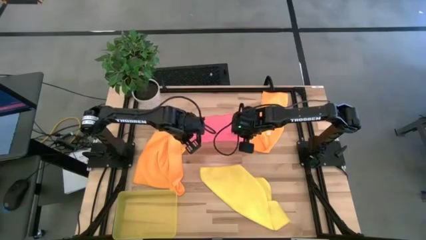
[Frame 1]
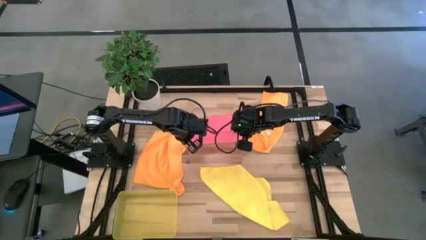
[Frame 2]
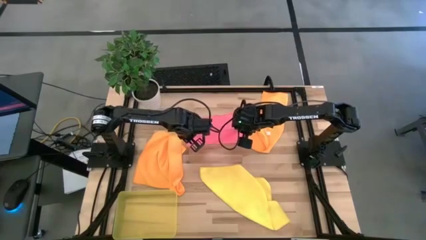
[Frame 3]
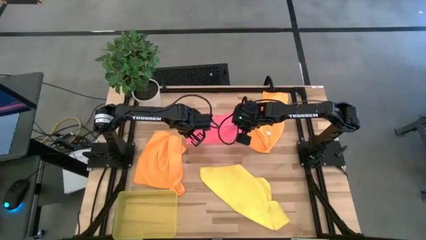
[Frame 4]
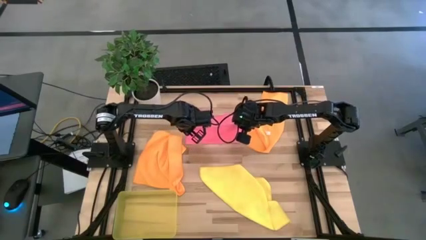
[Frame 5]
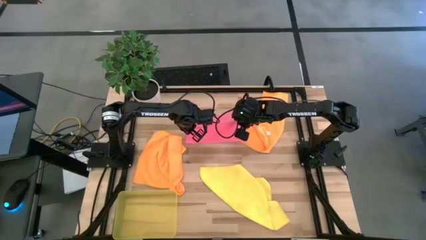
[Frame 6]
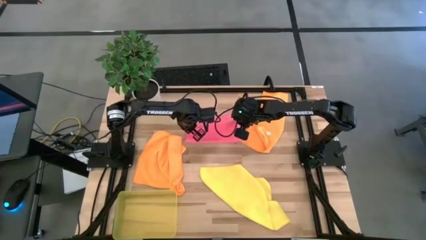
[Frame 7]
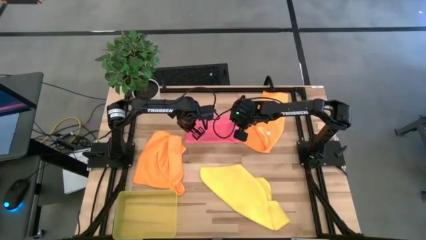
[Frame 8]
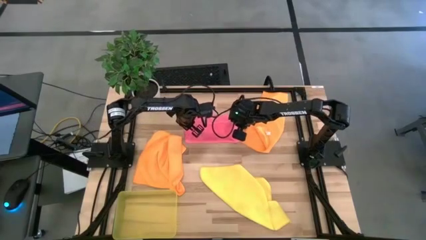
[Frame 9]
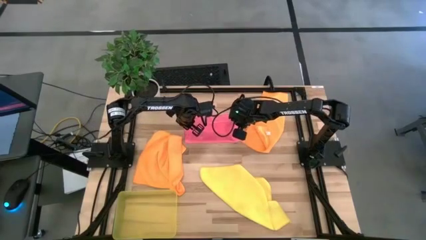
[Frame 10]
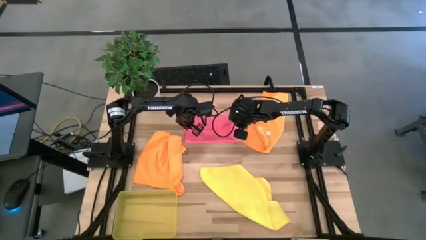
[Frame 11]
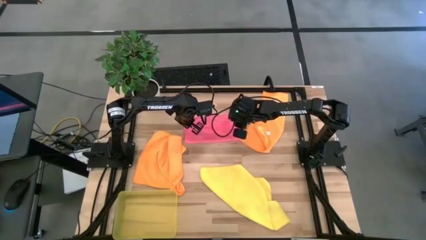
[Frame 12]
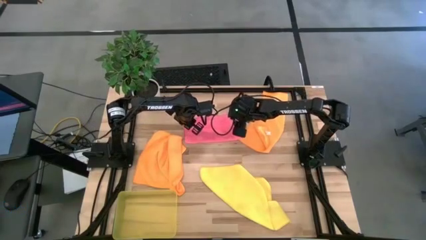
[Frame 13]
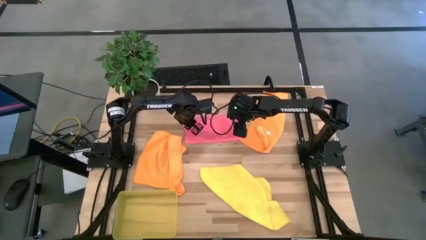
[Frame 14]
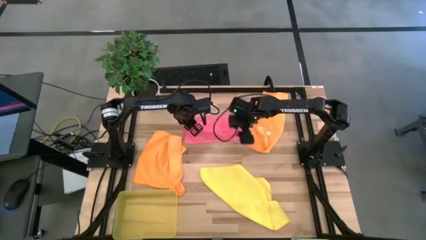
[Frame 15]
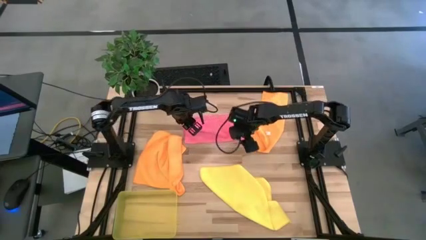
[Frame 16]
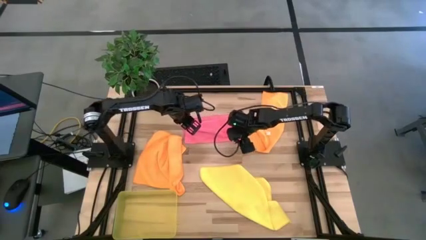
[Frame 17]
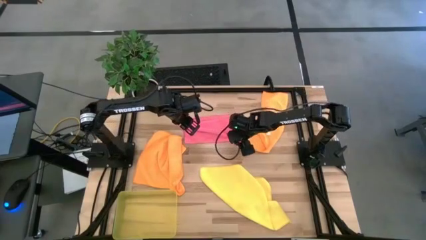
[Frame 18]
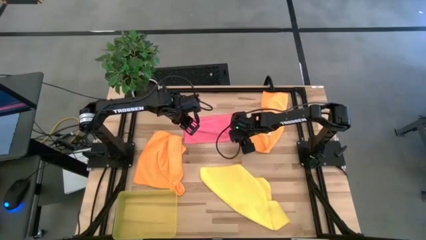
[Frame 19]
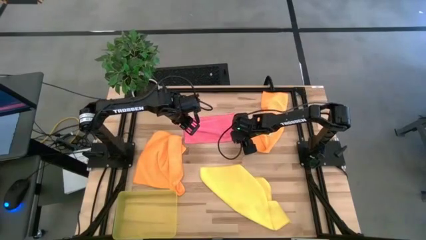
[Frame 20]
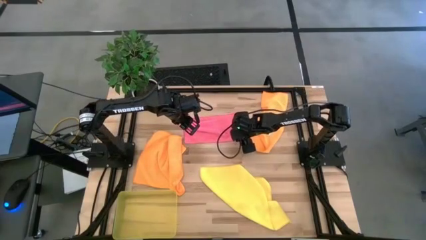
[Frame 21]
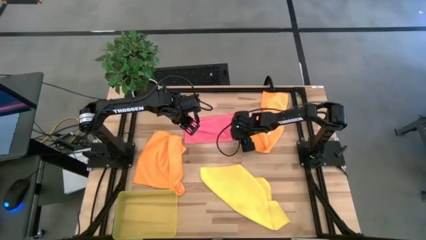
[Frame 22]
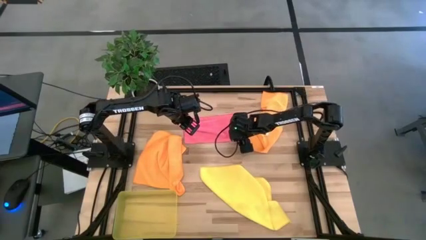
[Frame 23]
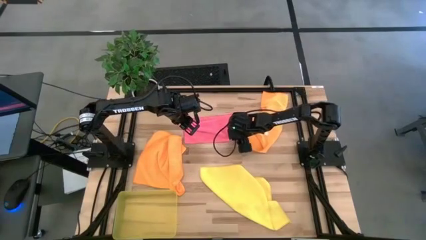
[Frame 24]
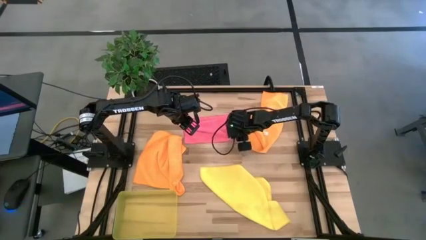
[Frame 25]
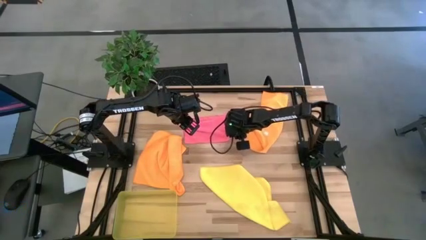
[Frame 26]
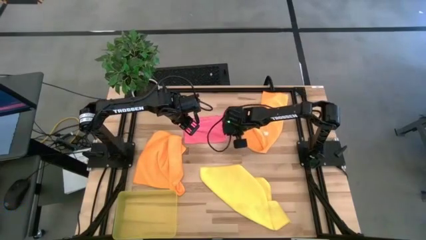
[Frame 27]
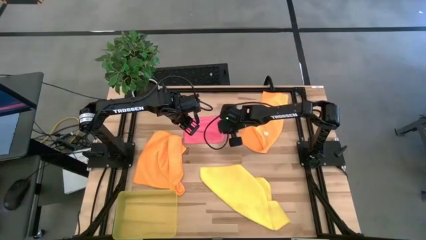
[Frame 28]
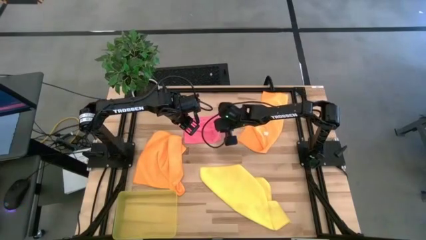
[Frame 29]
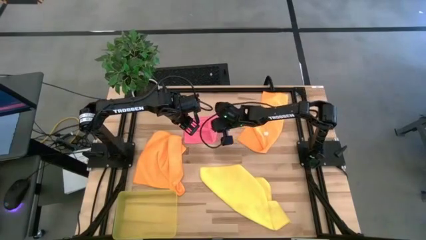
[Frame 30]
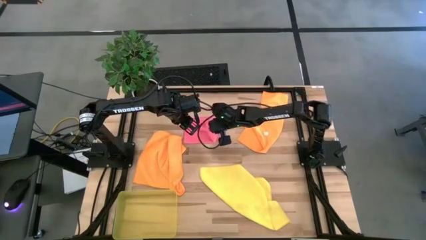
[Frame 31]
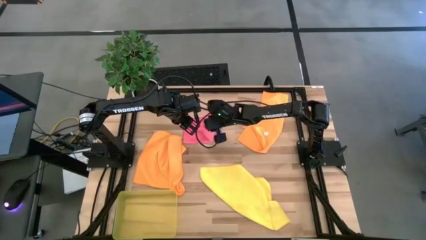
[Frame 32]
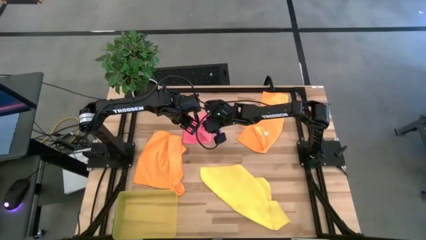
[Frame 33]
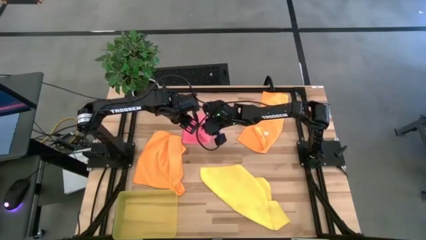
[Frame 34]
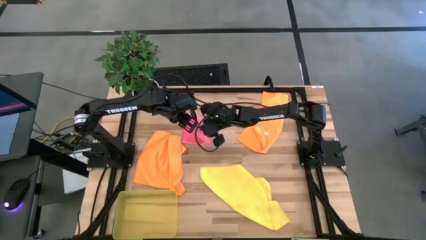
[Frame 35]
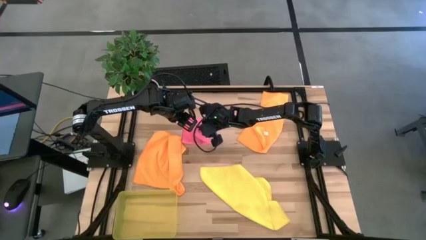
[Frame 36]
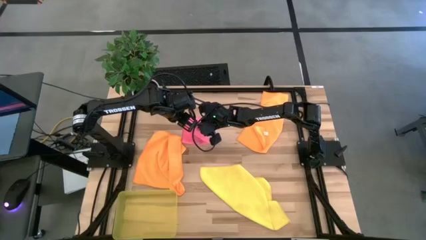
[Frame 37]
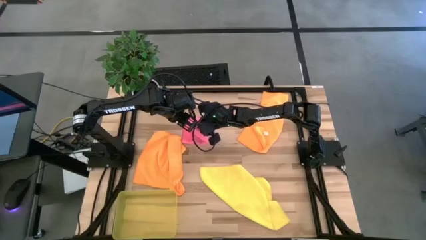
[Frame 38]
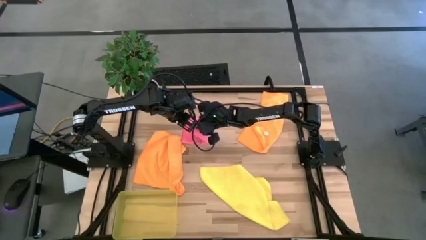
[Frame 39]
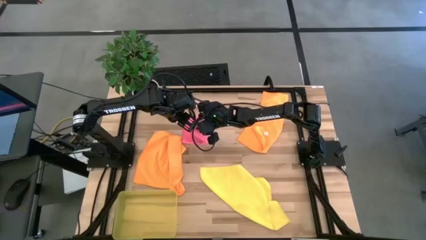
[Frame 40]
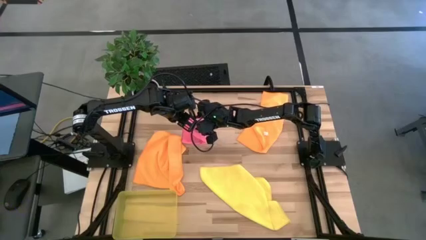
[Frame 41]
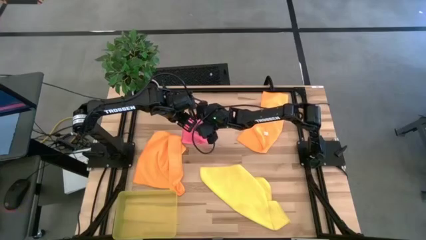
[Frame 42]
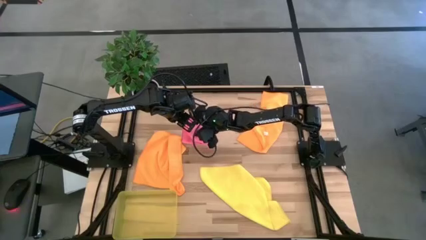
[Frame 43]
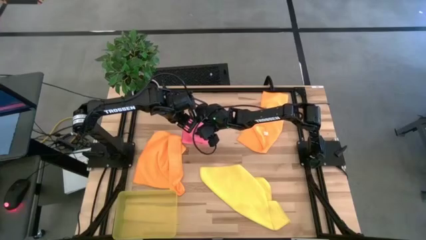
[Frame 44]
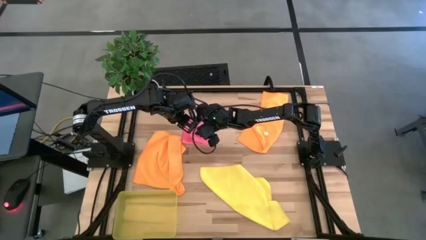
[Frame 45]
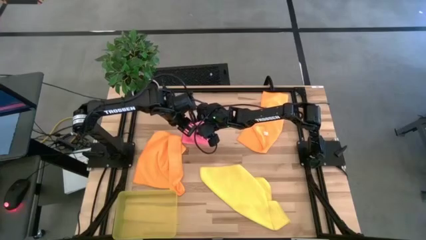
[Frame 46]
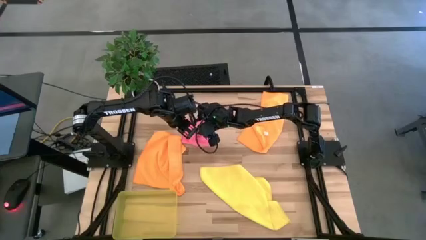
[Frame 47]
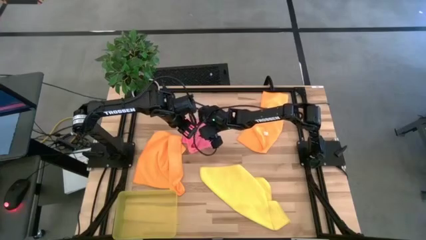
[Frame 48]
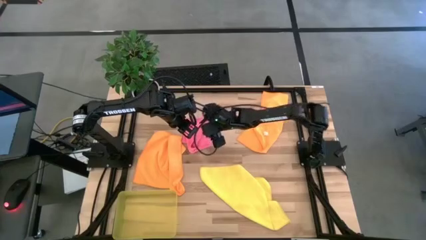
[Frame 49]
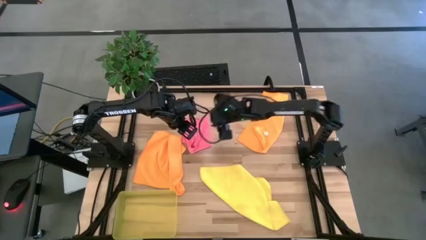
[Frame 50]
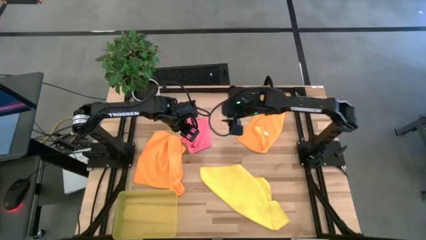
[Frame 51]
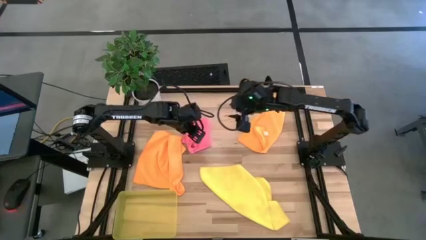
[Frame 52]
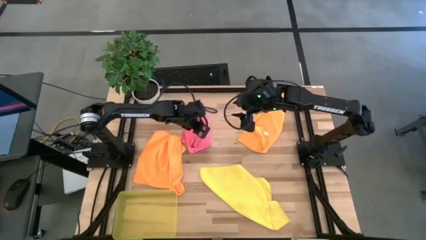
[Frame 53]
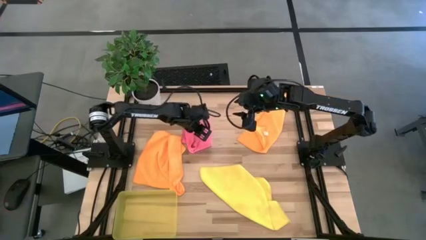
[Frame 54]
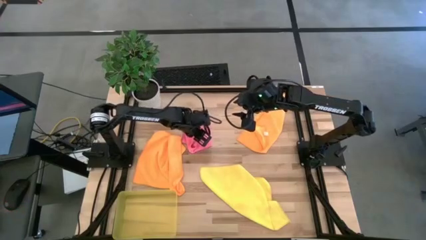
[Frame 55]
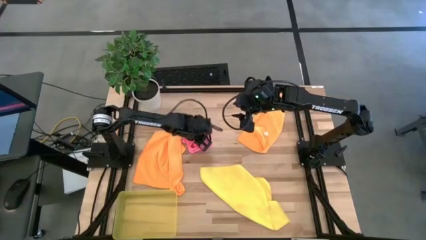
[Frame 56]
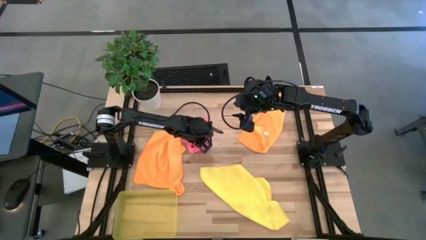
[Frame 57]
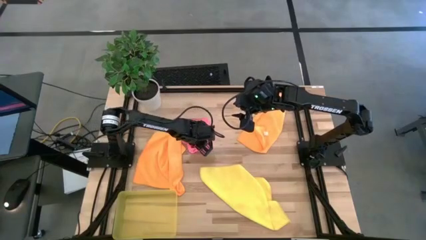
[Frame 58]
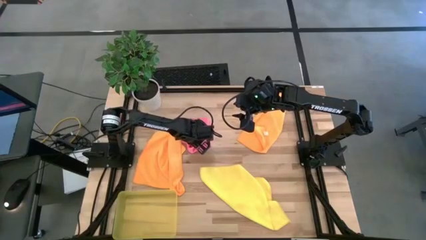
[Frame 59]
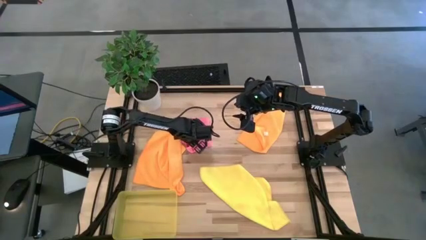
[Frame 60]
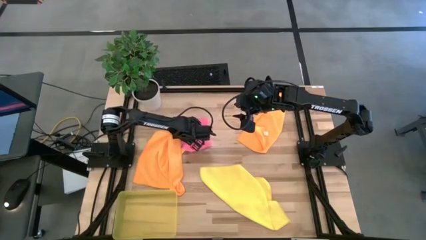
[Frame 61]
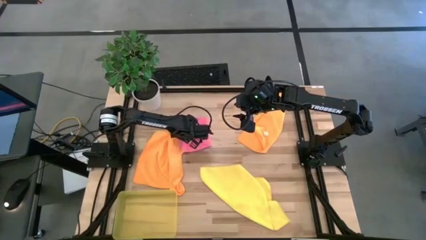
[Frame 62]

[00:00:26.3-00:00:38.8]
Task: Fold microfiber towels
Fold the pink microfiber towel

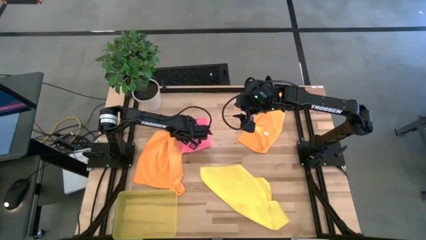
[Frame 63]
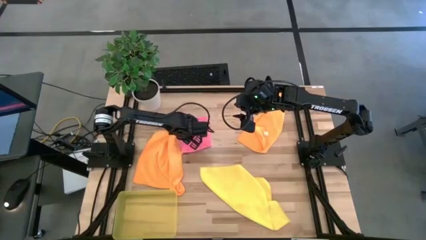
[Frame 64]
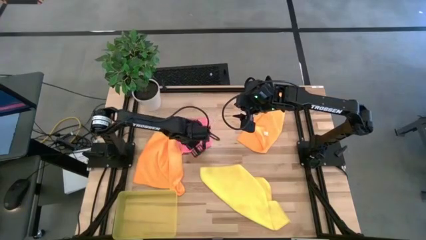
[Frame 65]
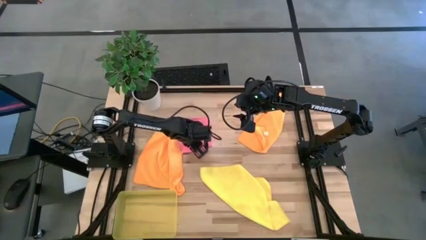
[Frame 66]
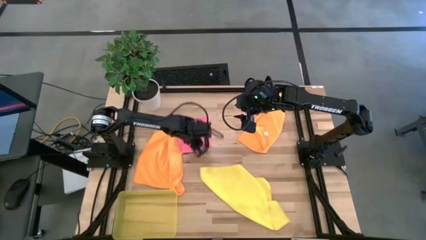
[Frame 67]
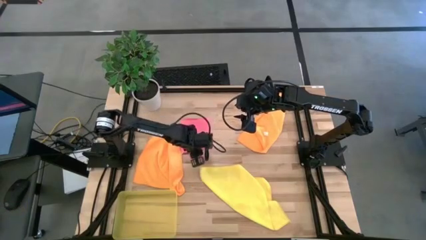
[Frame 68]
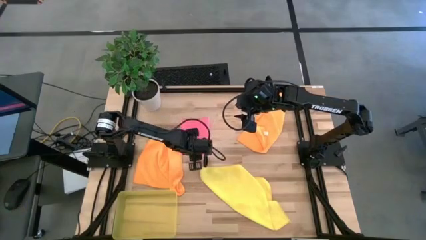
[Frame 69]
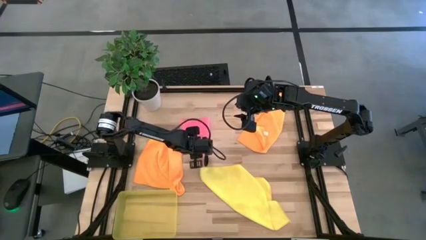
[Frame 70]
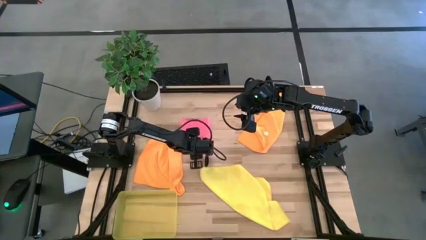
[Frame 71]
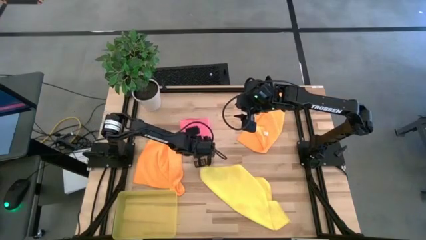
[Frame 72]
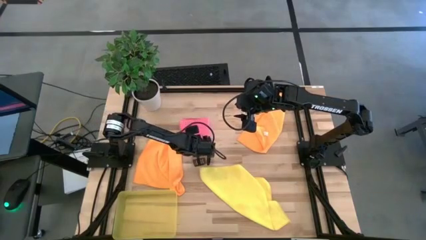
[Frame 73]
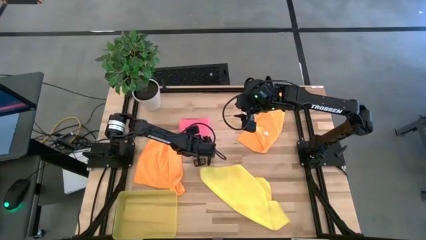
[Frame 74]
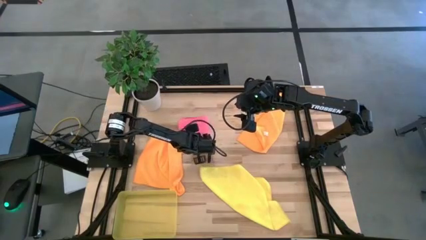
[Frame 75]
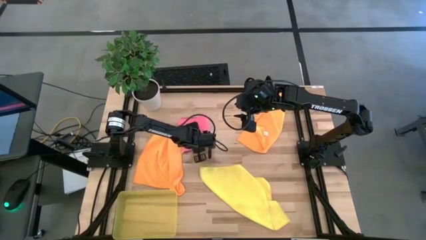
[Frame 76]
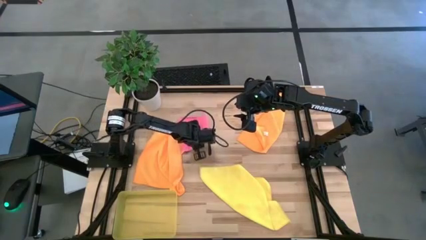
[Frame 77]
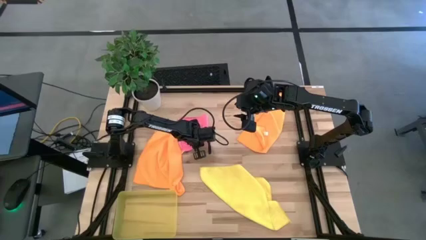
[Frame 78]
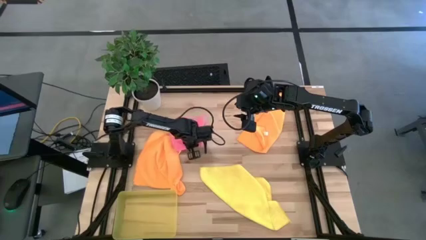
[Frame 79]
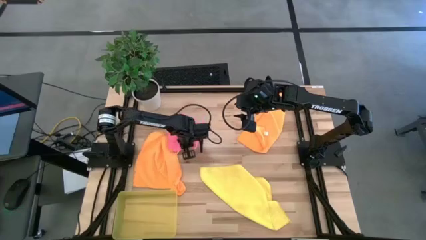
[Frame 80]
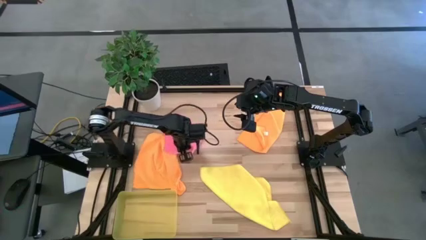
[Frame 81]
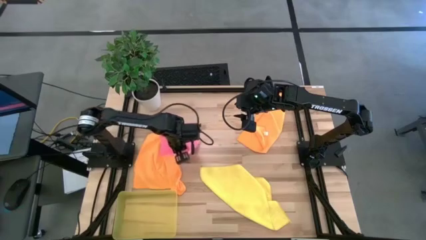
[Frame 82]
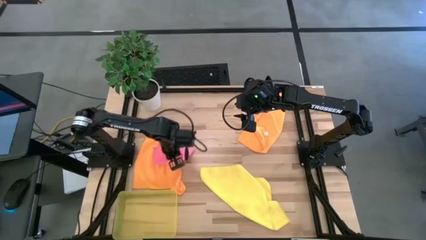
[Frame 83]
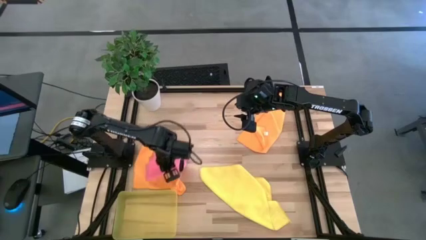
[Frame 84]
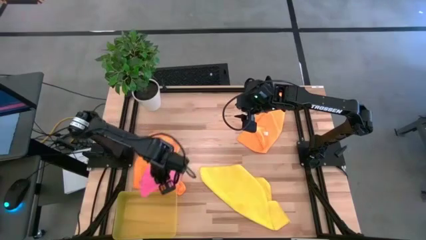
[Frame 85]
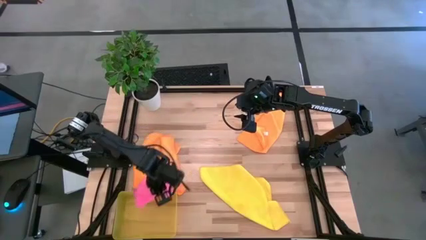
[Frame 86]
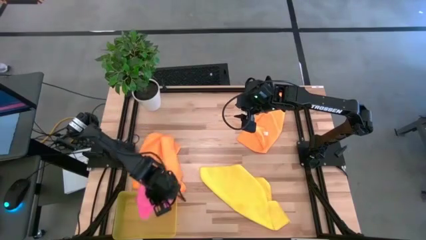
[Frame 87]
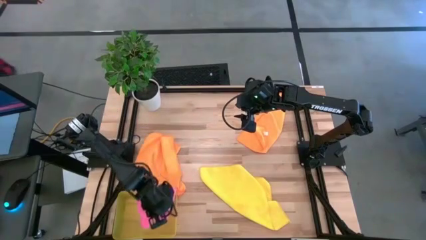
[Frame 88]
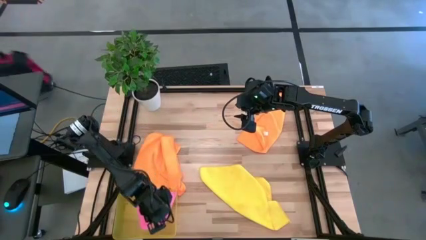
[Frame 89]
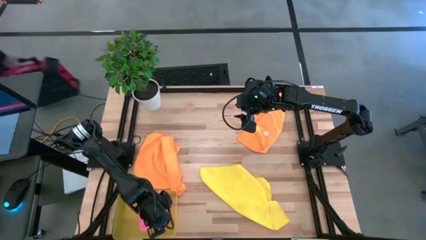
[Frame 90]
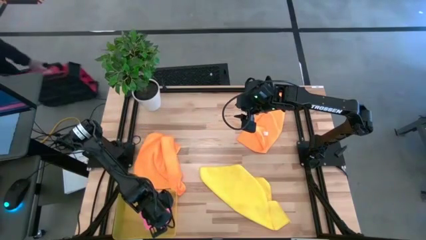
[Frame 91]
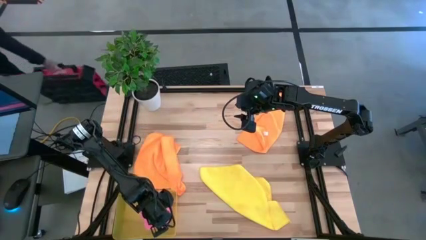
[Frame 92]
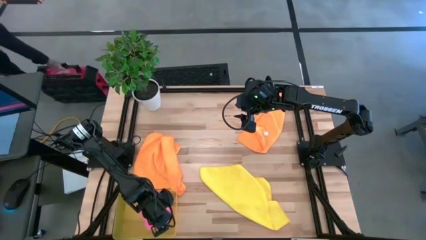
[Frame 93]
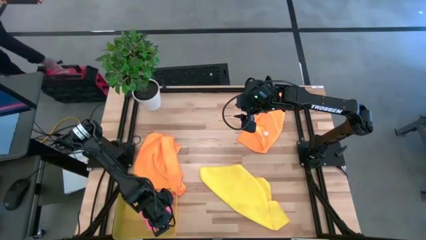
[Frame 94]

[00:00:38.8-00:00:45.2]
Put the folded pink microfiber towel into the yellow bin
